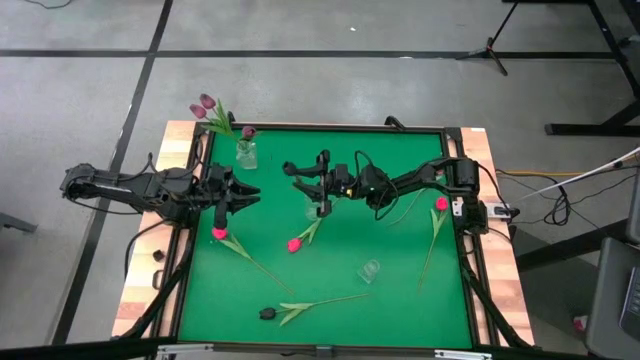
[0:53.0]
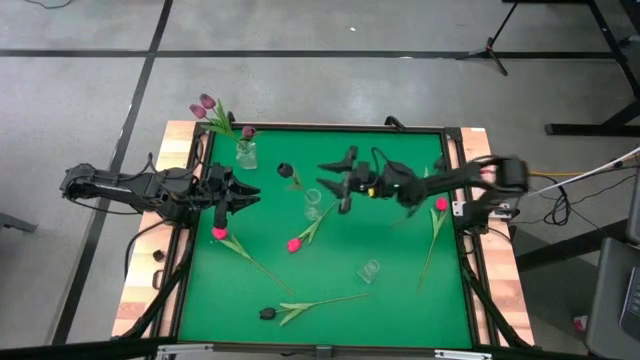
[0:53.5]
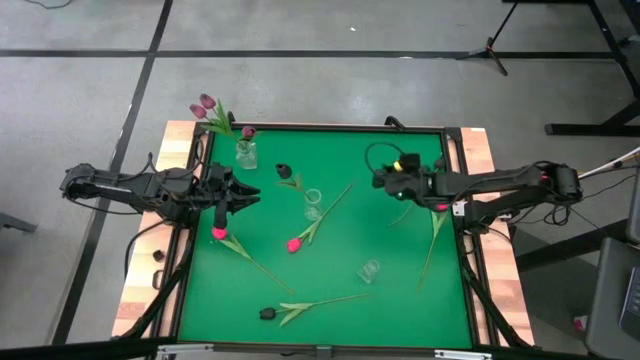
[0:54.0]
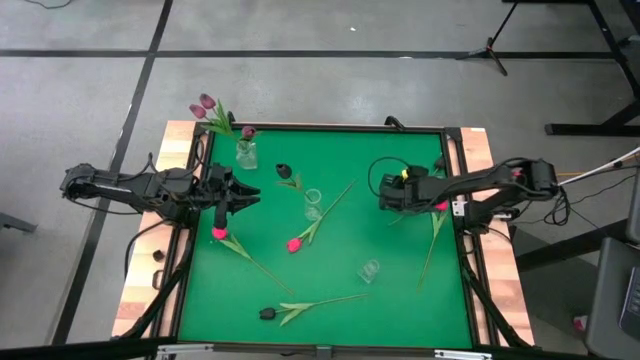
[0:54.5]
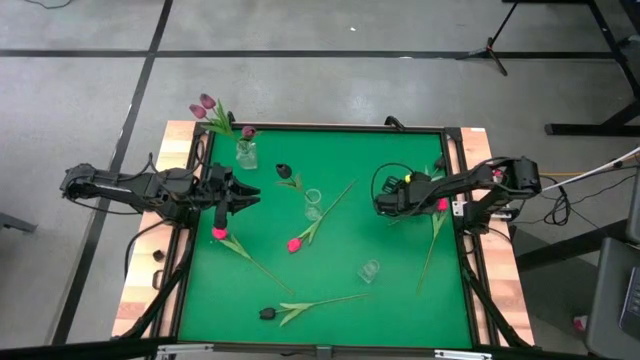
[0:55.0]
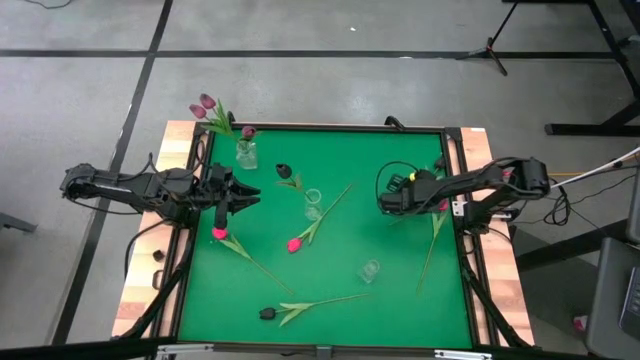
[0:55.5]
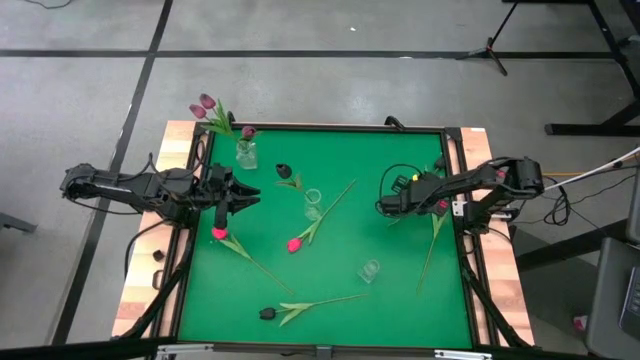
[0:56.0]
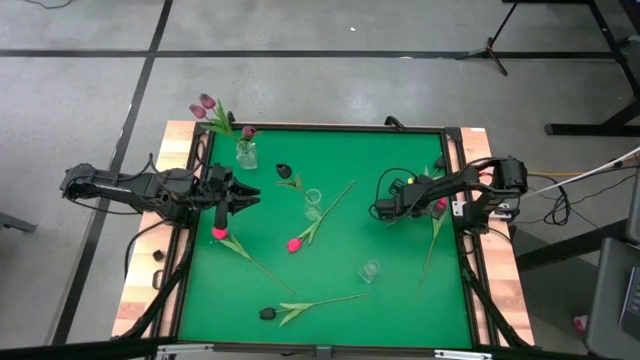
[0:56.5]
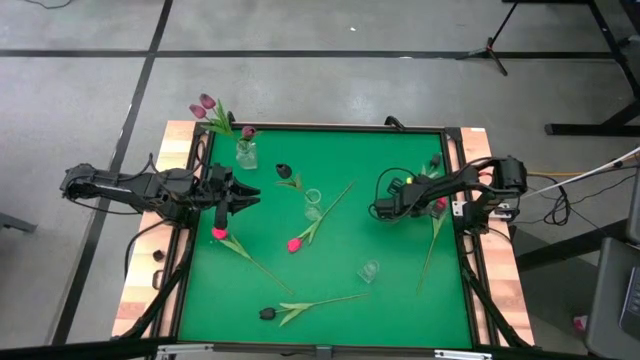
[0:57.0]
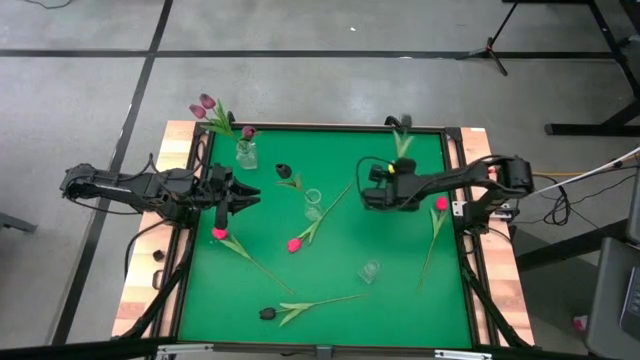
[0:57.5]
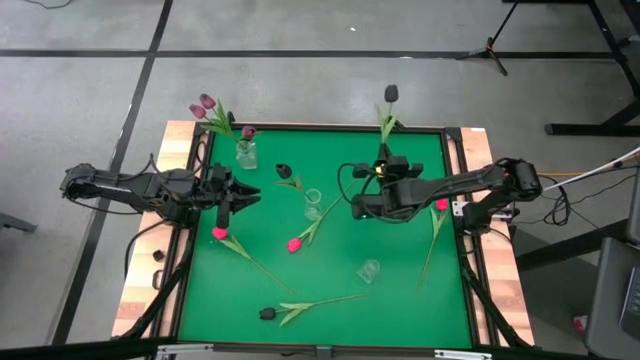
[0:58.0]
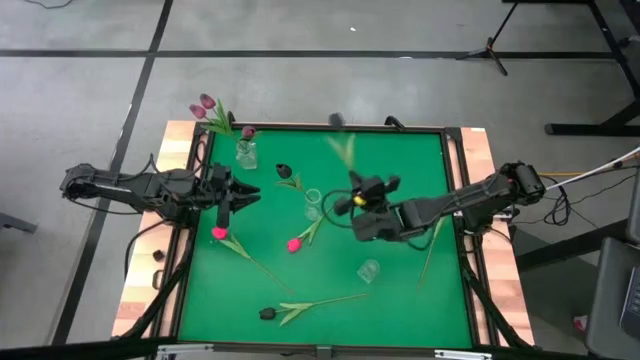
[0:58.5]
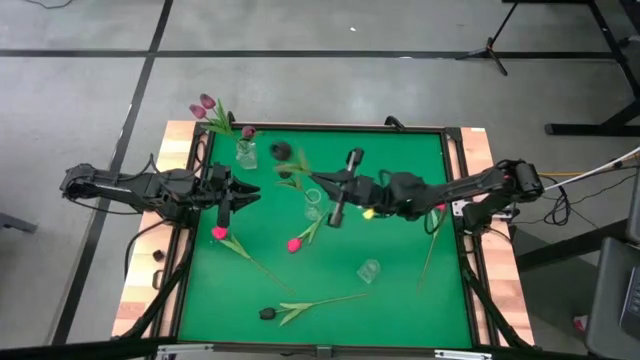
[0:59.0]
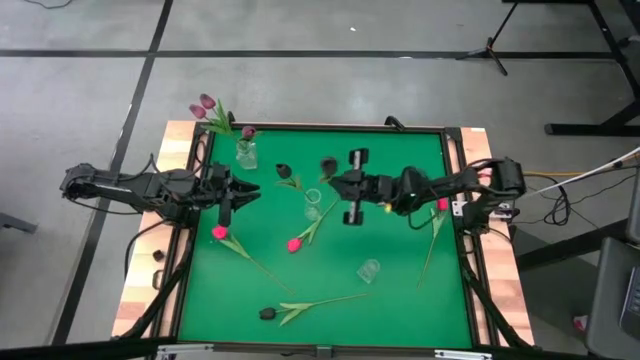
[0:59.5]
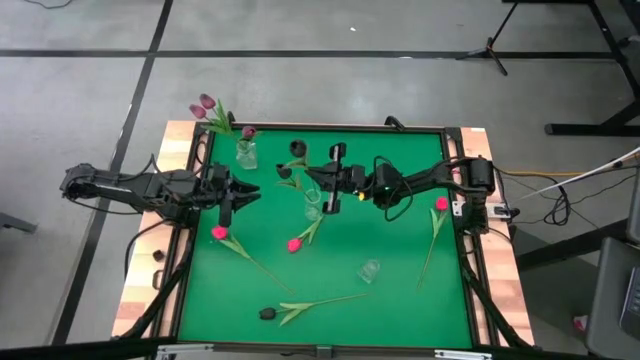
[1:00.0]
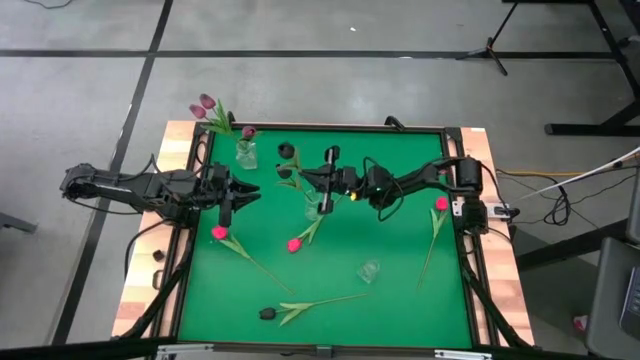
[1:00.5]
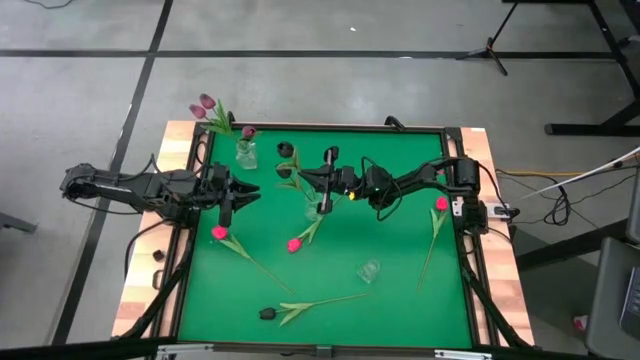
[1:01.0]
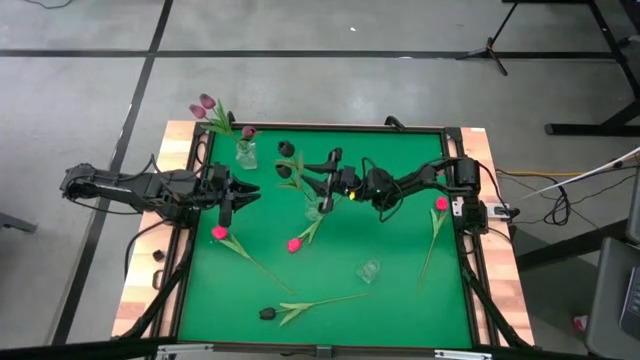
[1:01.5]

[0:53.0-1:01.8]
Task: Sort flowers into vase by color
Put the top black tulip into the center transparent vase

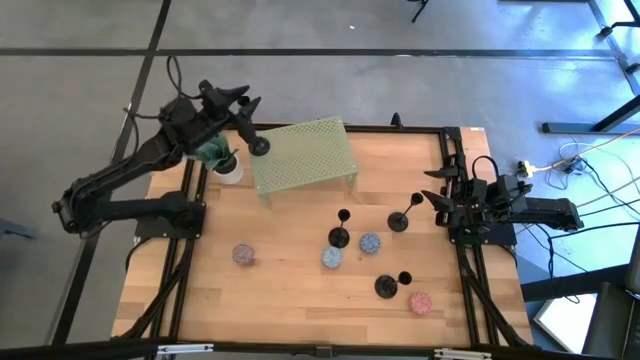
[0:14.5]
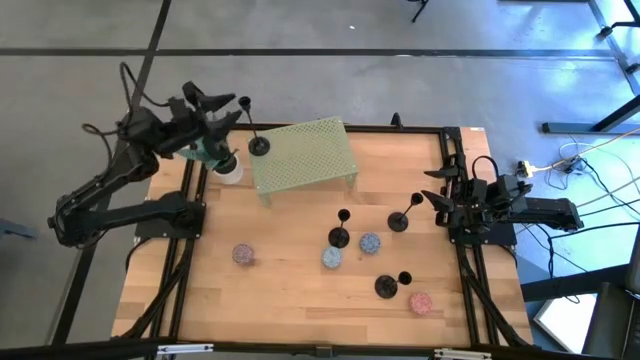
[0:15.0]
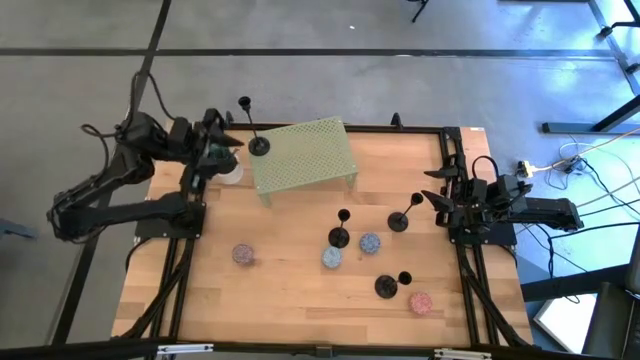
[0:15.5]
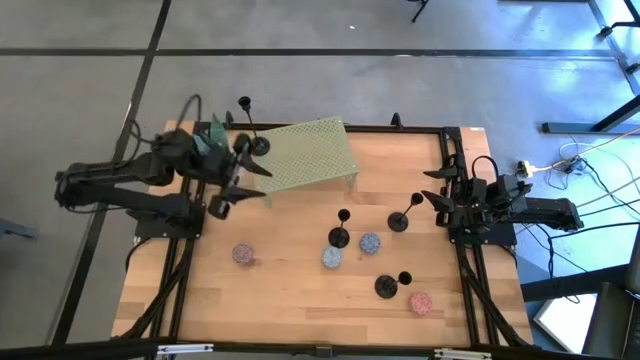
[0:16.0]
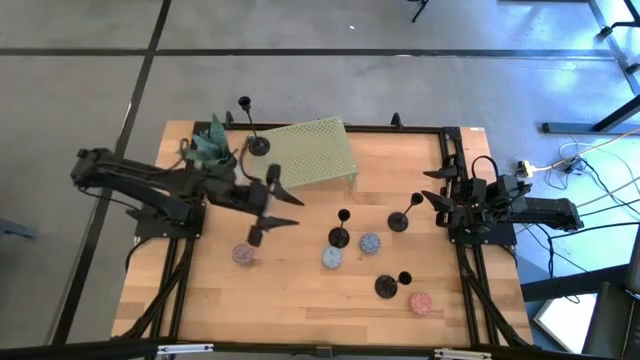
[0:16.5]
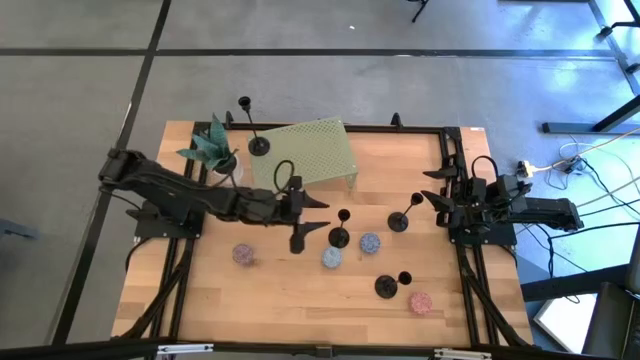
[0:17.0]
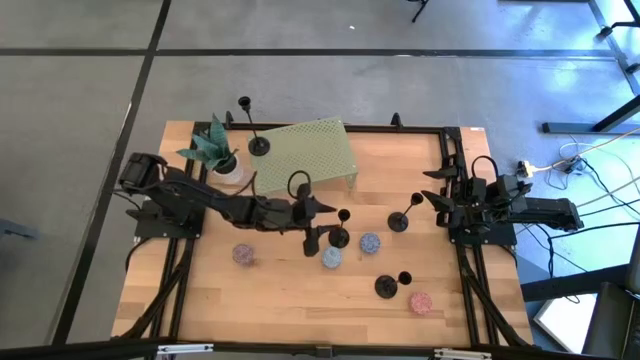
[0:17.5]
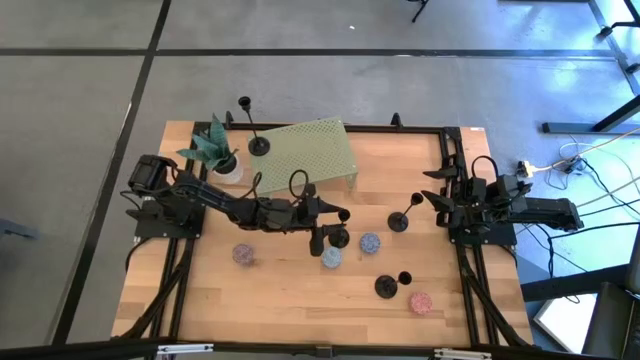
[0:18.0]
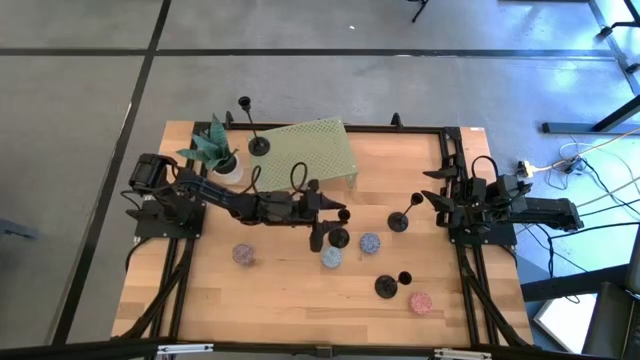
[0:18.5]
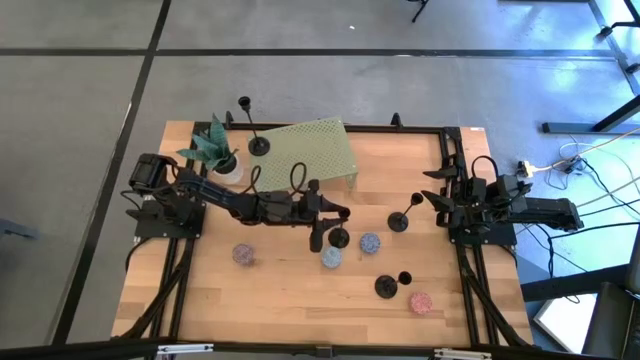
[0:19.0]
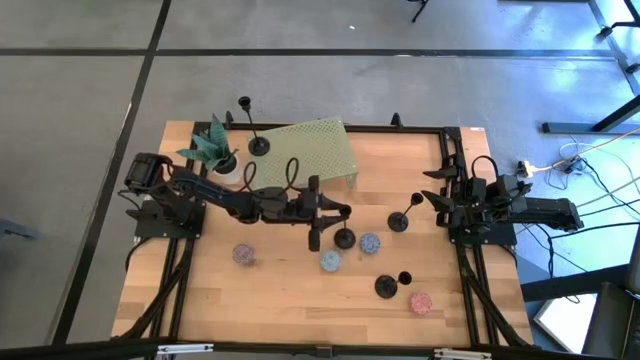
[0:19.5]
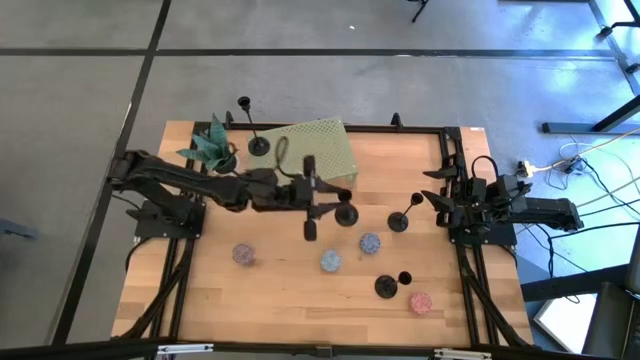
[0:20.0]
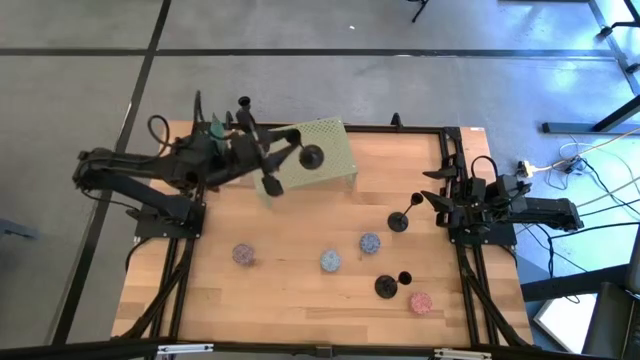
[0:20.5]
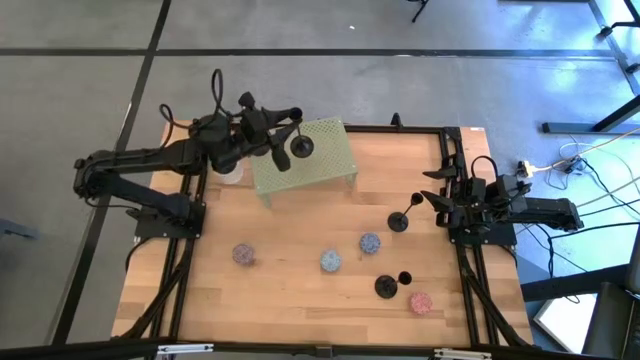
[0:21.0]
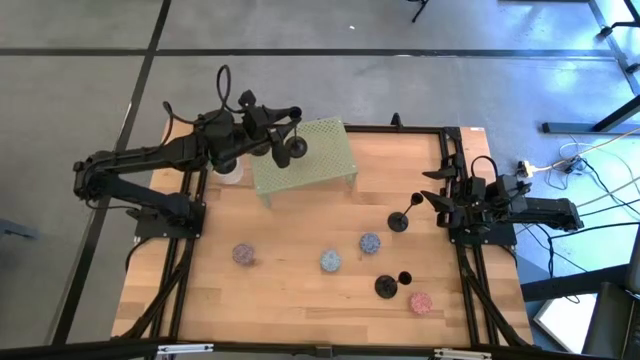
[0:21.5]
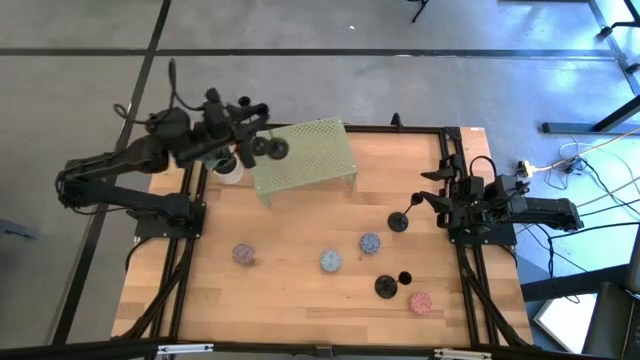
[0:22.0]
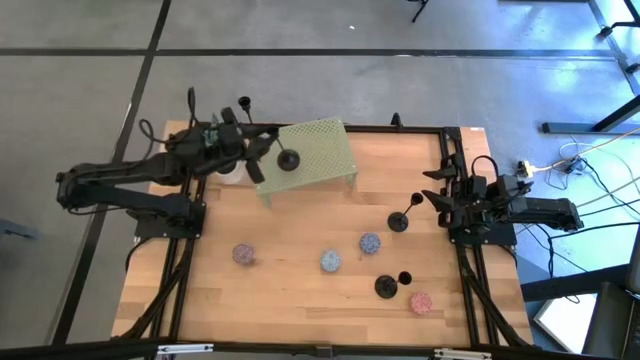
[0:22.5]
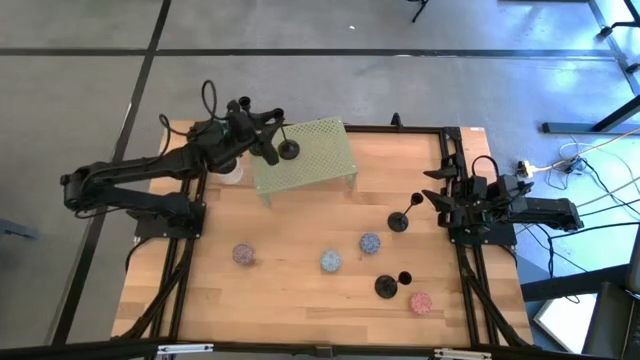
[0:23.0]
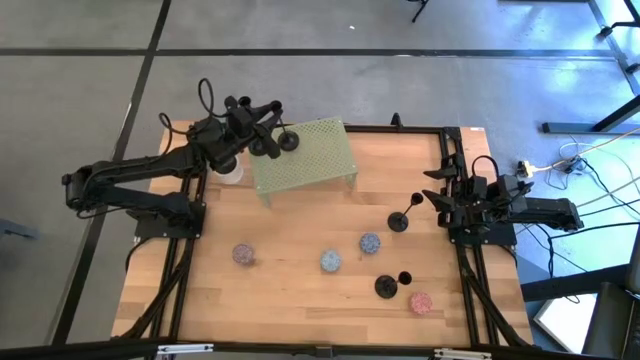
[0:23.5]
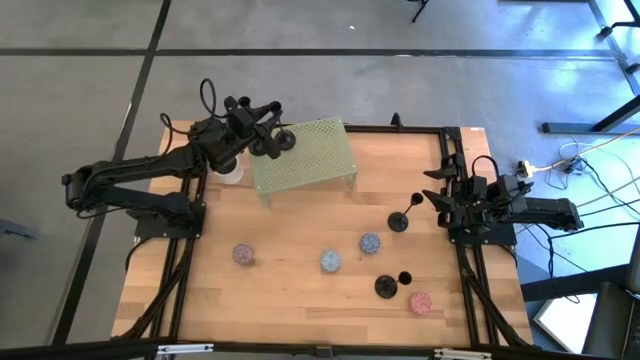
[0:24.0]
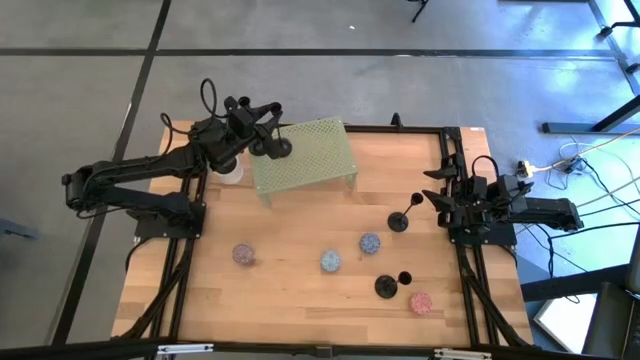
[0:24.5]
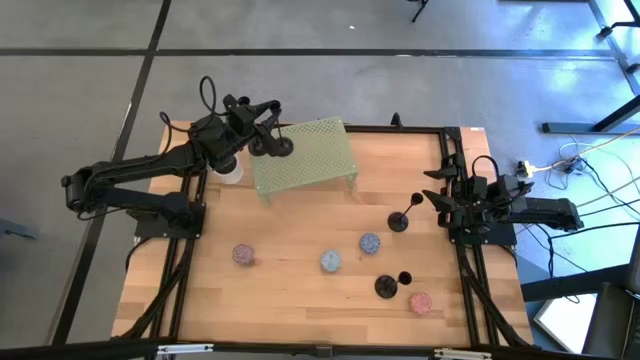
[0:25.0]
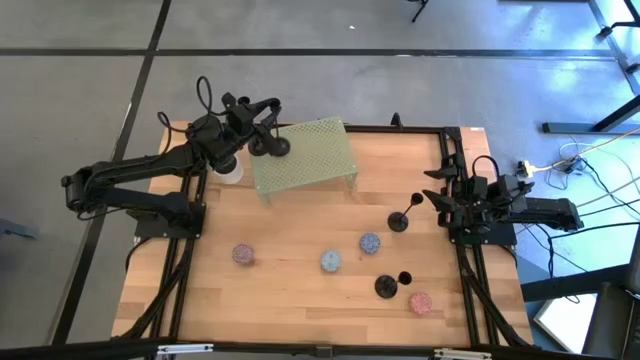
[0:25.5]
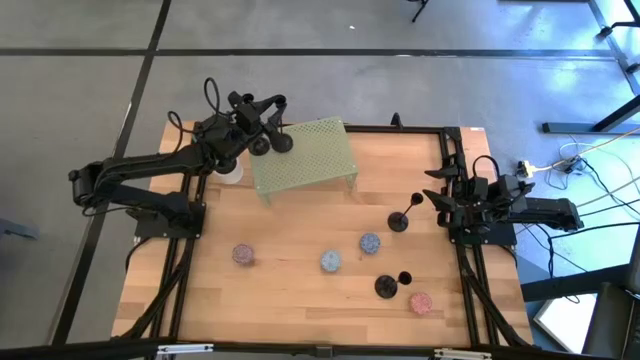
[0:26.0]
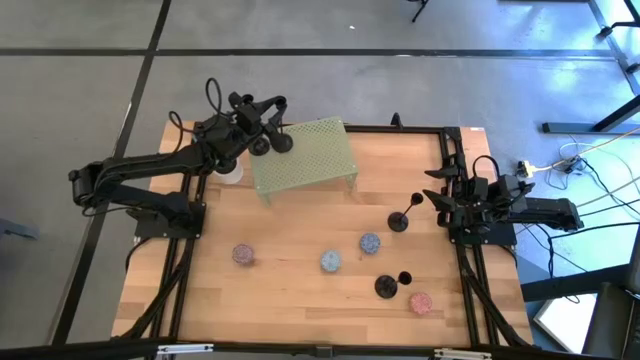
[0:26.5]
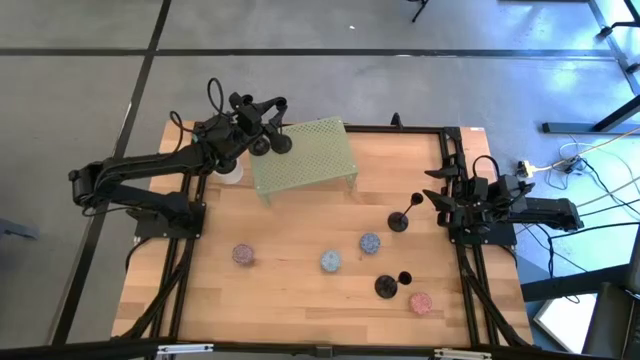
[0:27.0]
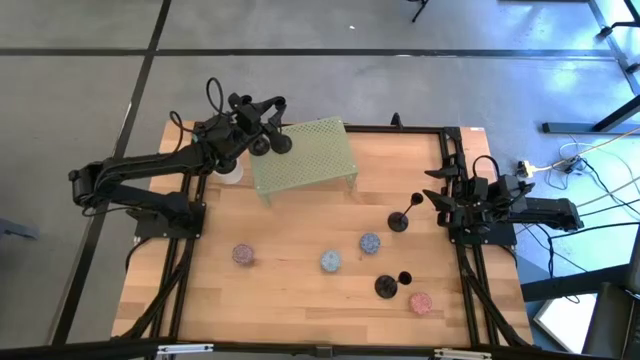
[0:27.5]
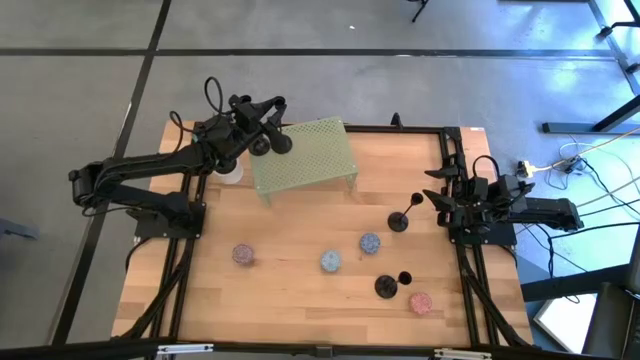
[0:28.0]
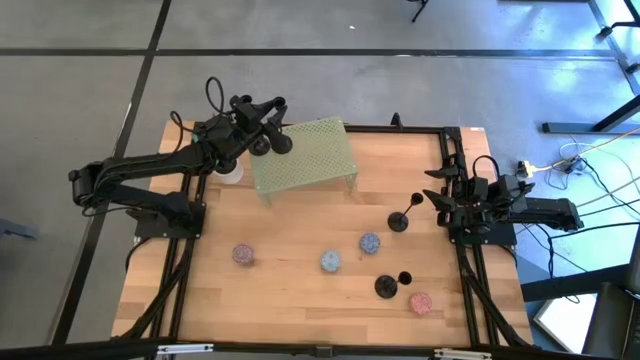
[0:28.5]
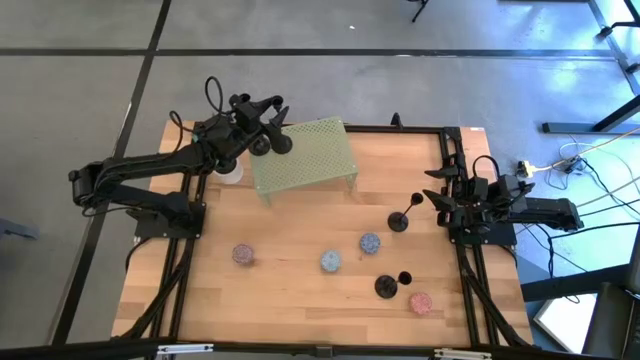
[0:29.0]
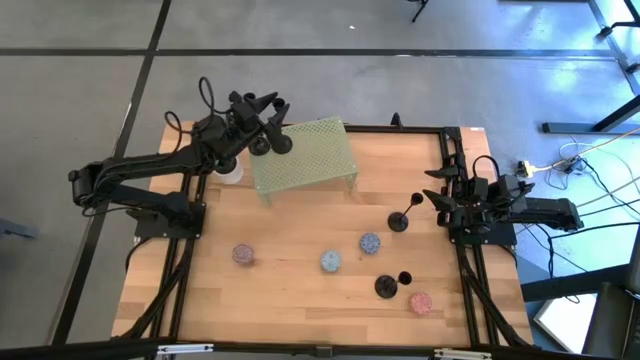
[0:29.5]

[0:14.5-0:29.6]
Task: Pick & Place candle stick holders
Put the black candle holder on the shelf
